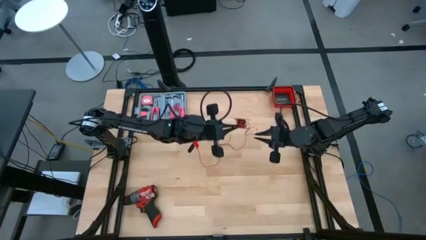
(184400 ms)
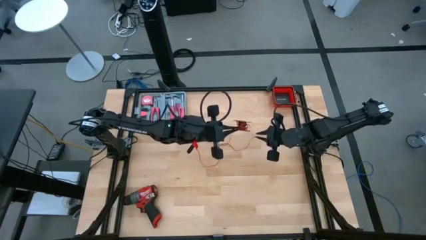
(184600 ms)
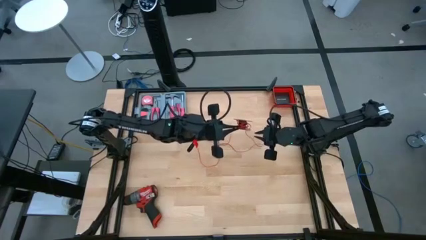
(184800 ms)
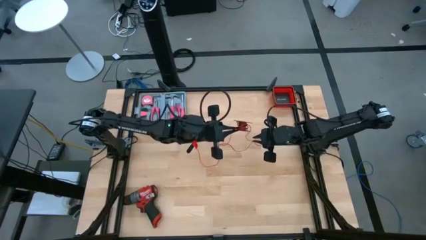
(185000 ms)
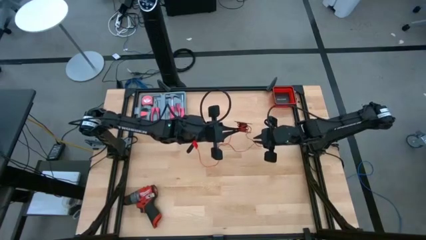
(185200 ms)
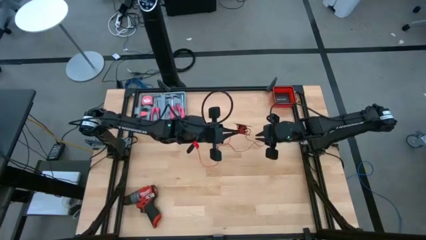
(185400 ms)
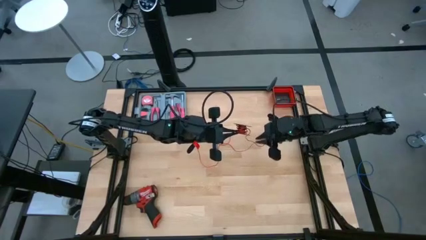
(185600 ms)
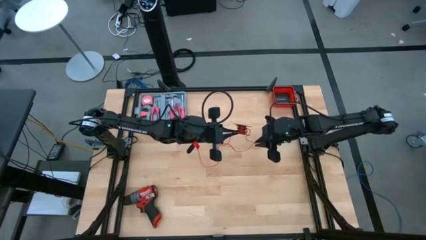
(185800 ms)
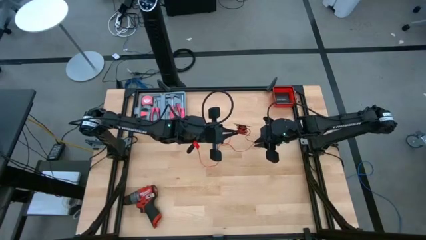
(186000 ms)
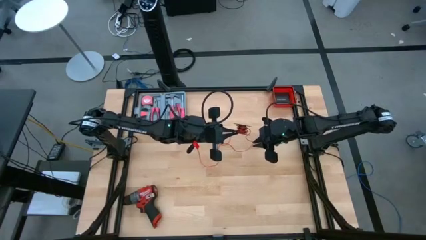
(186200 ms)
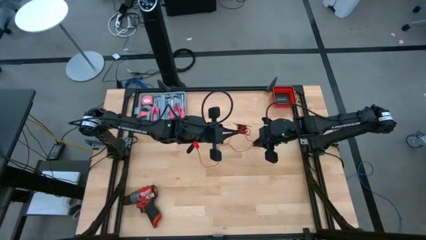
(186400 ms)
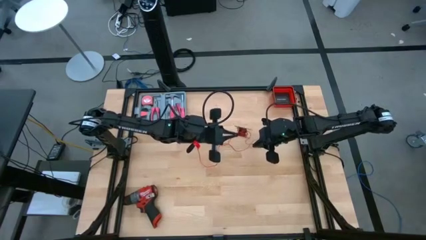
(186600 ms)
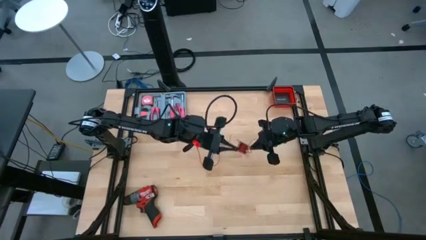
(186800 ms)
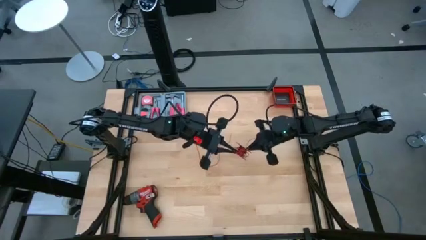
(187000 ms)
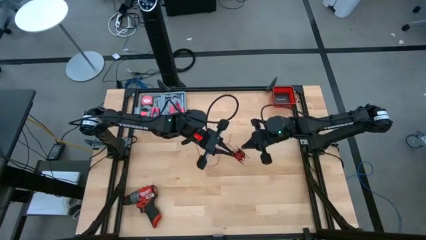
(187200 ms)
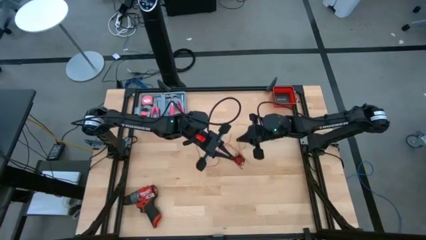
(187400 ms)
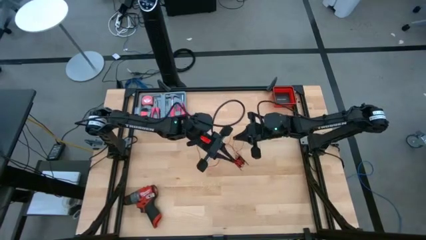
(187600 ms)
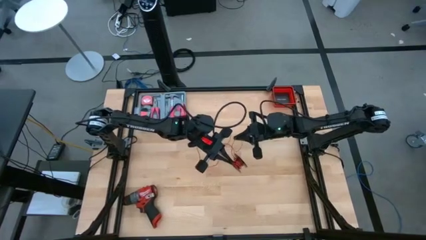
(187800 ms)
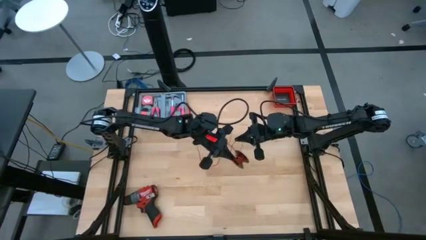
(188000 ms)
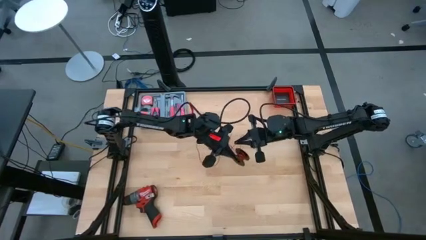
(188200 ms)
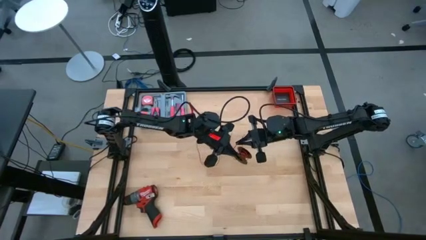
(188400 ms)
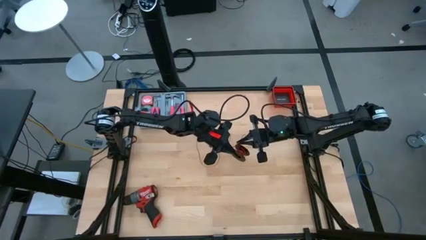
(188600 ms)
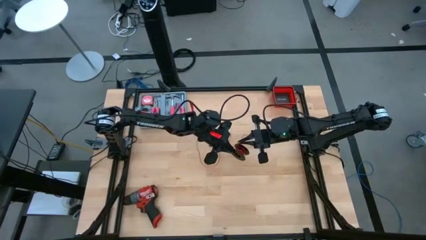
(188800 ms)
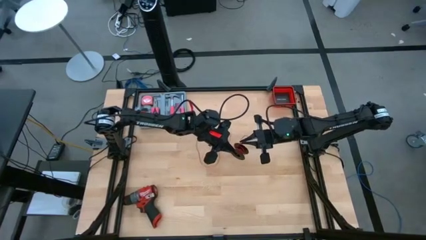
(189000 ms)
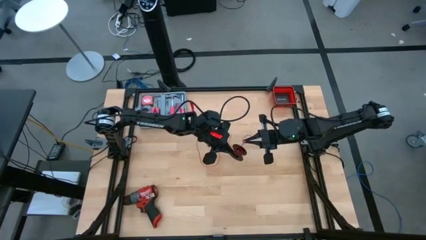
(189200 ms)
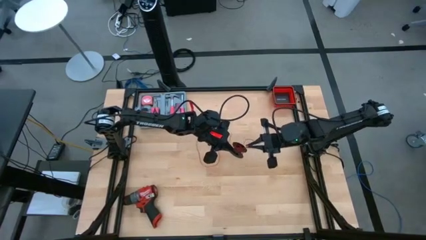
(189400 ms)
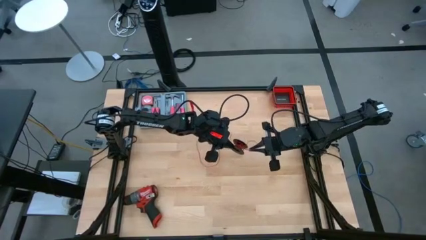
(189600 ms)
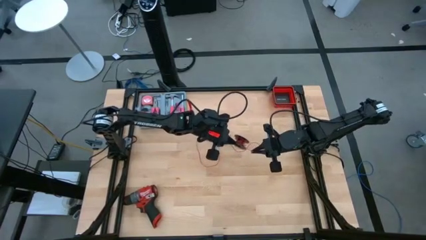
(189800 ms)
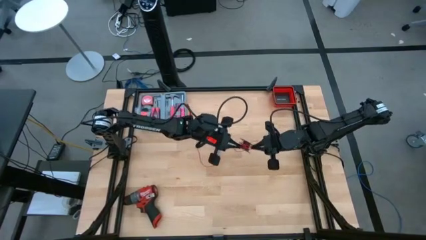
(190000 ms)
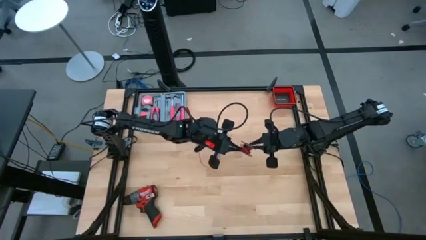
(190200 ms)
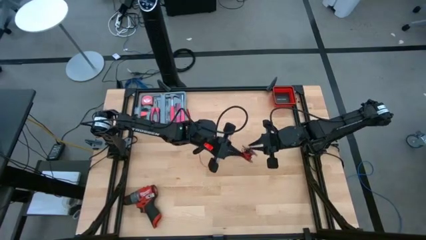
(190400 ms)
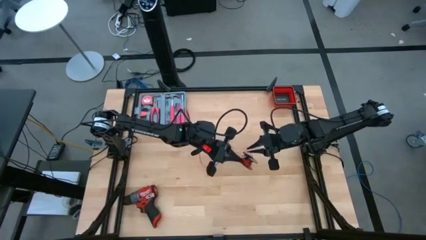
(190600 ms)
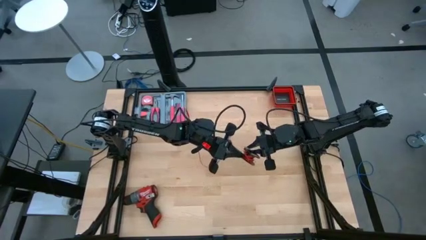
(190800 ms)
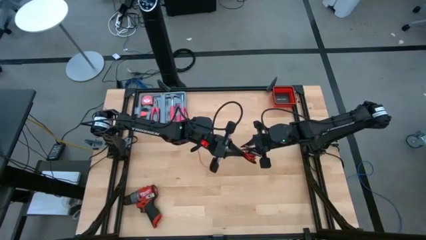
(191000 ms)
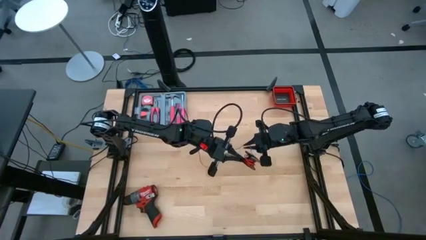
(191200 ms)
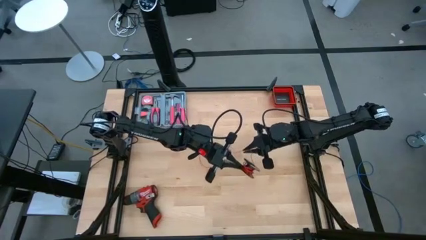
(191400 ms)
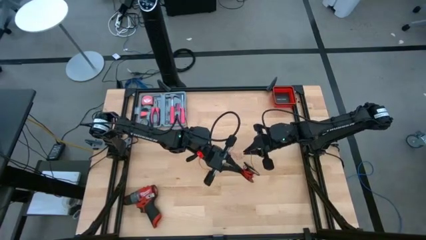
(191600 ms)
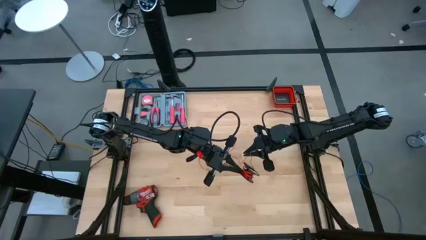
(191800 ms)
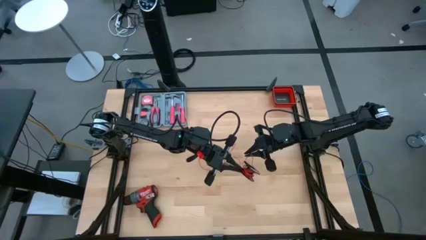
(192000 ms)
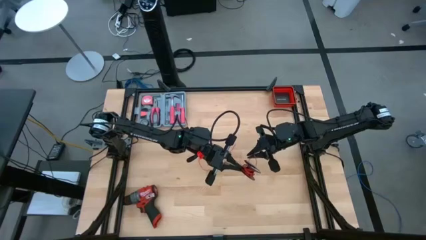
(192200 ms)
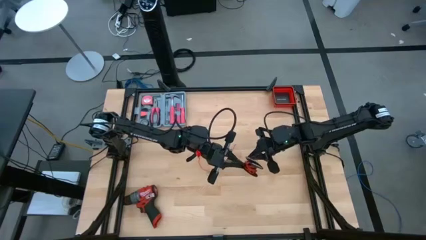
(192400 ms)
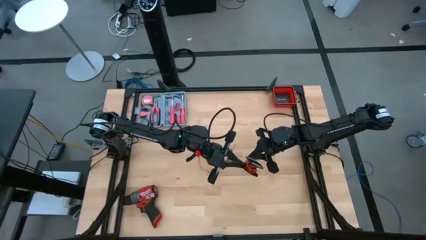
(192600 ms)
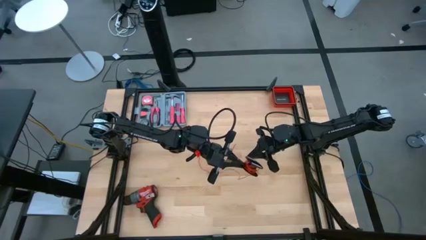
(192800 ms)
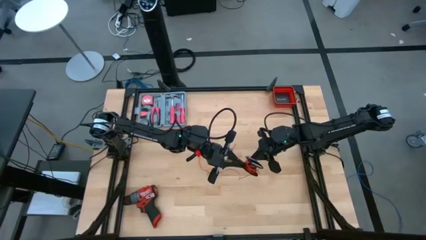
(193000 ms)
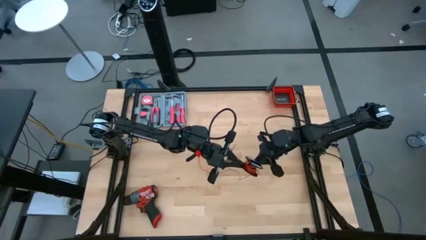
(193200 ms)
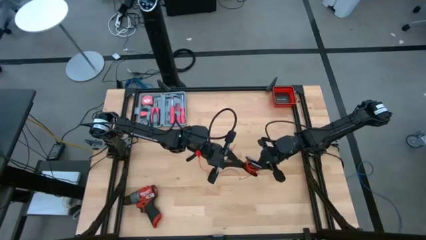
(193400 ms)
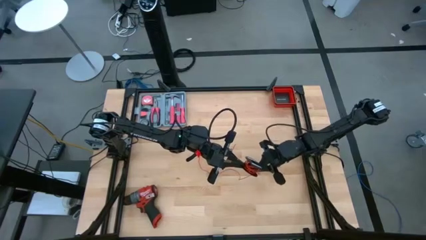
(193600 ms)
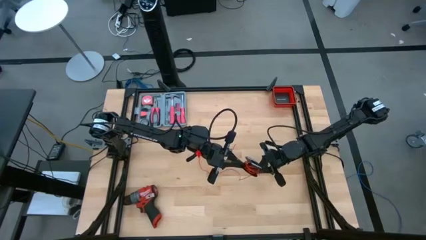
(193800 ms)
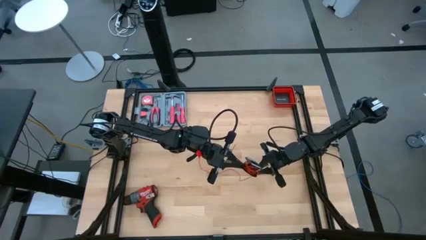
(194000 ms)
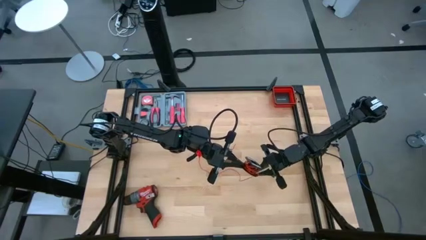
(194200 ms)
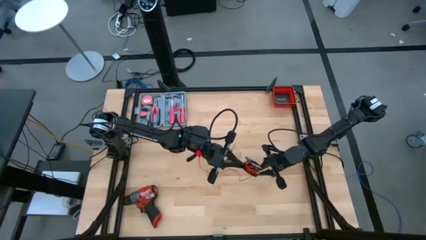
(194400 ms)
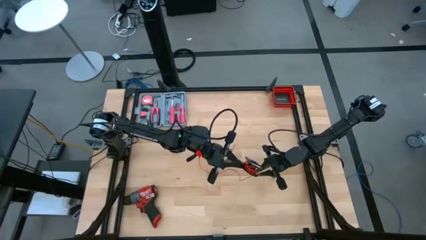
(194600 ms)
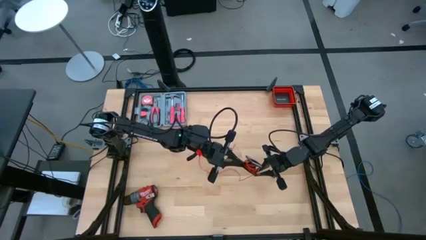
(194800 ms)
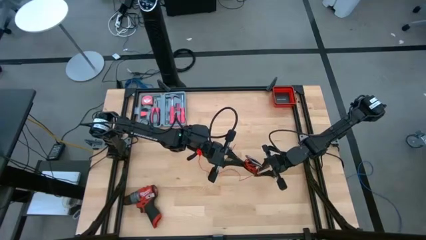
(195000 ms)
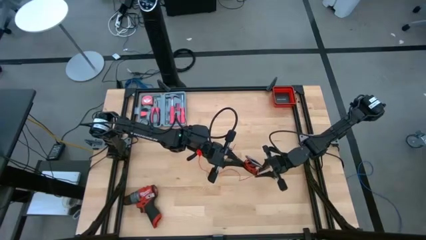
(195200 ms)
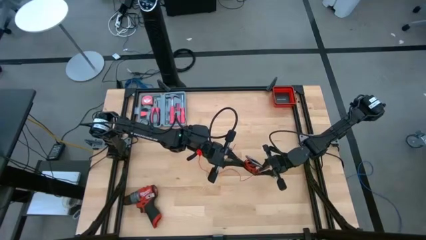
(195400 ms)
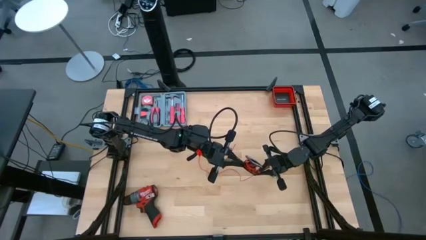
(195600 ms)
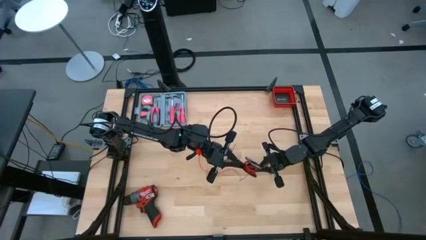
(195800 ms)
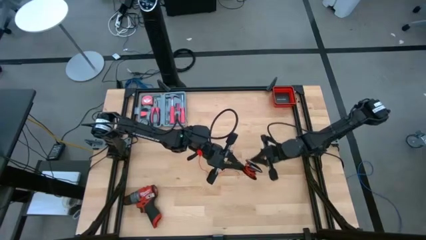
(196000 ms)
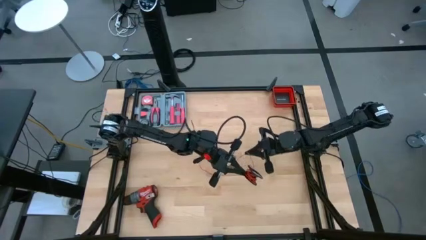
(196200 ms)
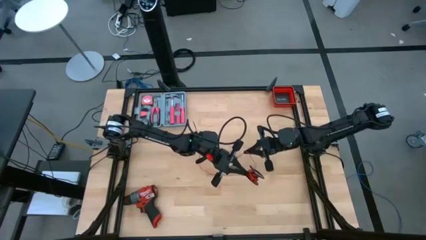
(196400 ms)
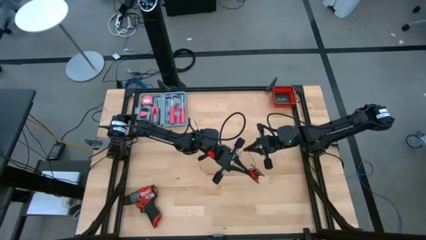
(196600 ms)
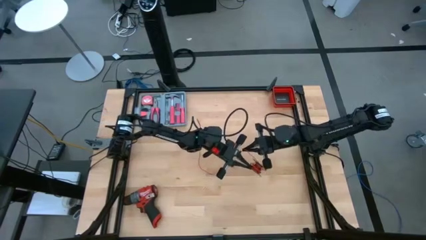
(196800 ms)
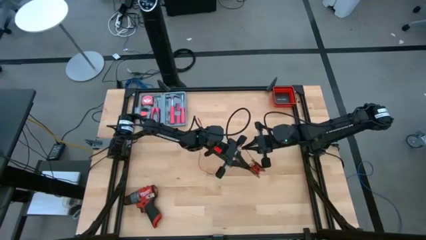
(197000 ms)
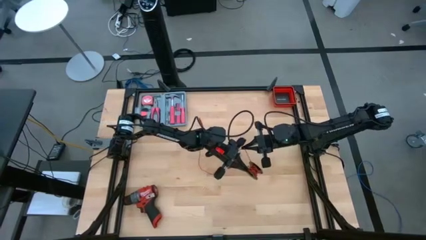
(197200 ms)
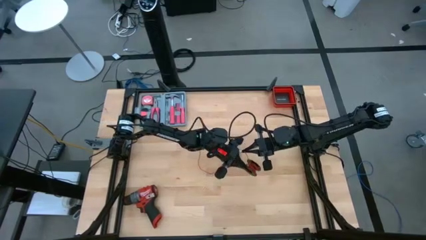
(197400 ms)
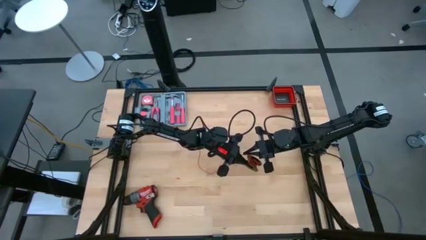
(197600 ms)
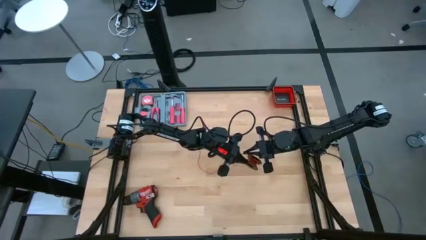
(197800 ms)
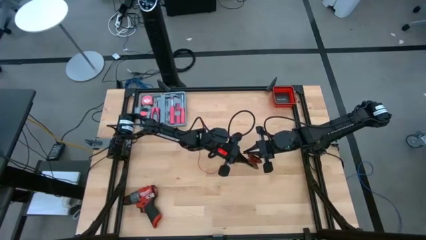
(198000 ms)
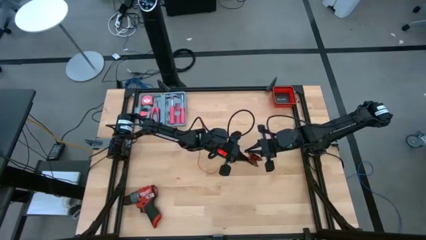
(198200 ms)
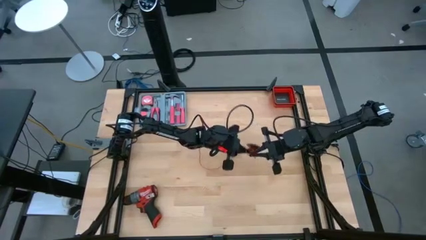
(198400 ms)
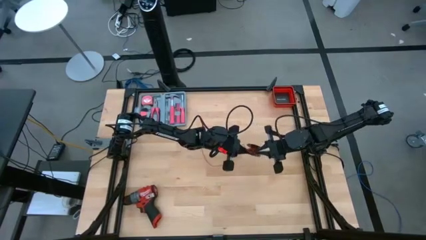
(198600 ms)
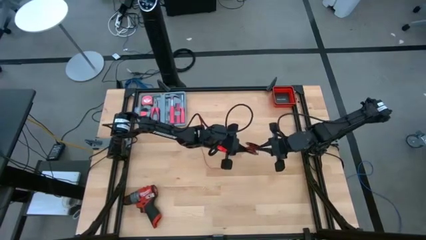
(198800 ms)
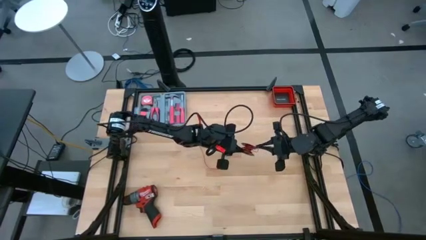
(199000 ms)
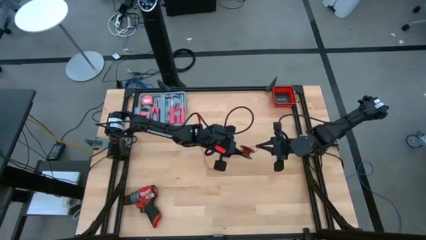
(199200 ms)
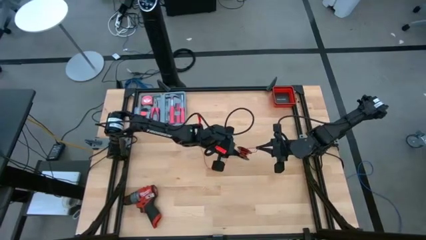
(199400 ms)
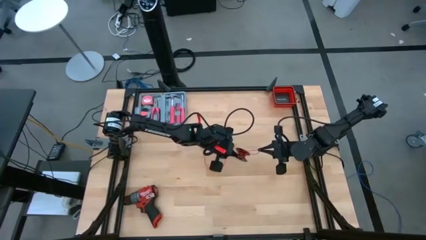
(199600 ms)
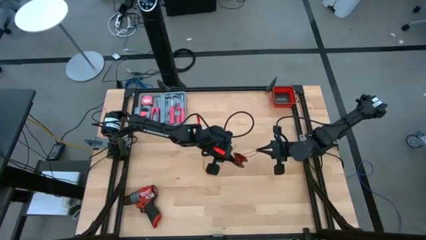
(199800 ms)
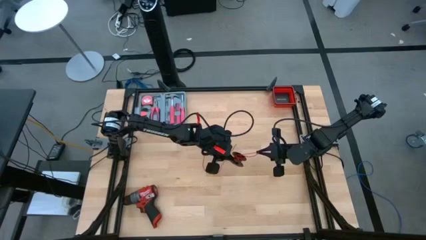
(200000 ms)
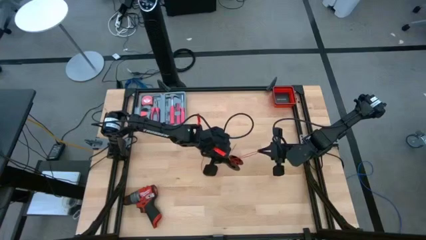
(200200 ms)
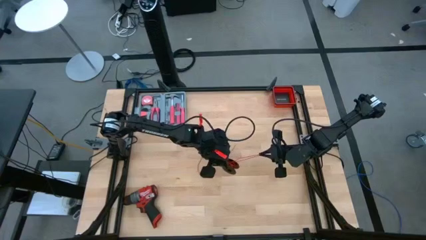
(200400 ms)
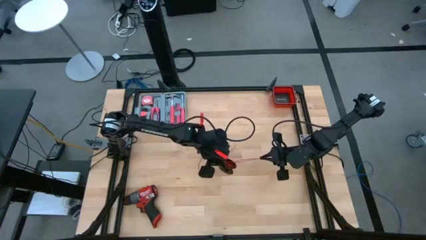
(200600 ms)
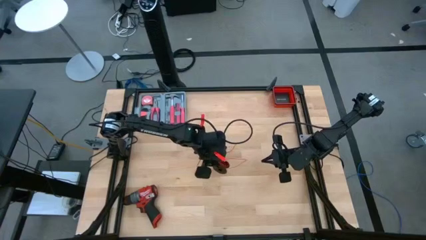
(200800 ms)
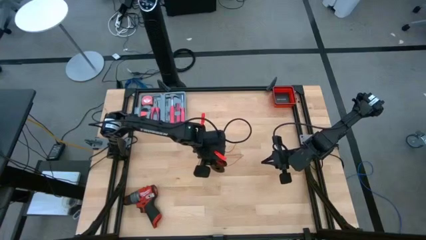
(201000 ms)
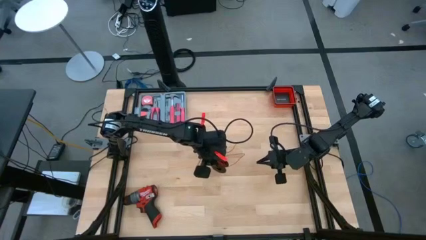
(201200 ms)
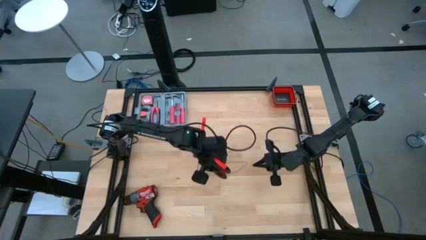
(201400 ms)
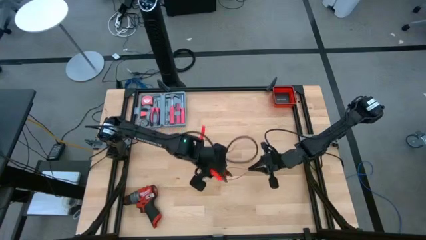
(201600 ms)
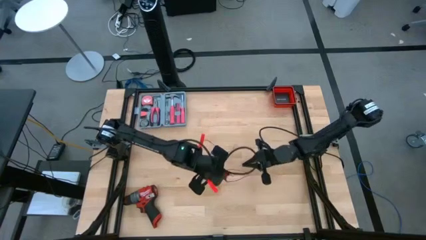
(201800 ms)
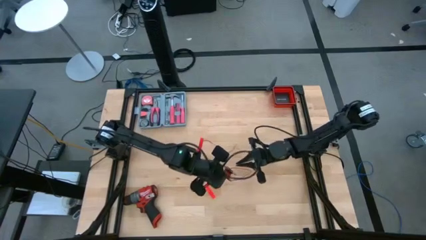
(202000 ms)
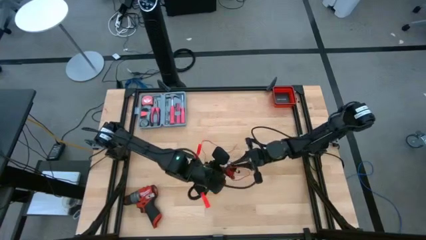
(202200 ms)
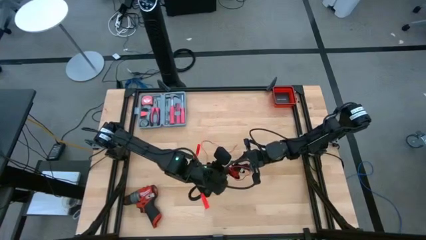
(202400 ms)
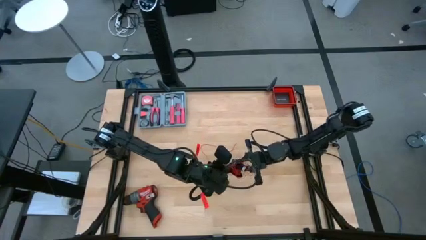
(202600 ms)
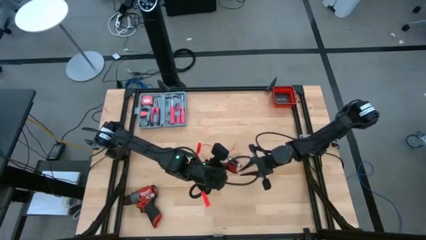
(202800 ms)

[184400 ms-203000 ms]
Task: Coil cords
Coil the red wire on the black spool
